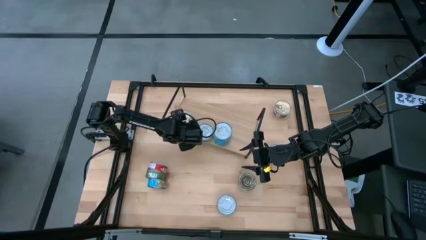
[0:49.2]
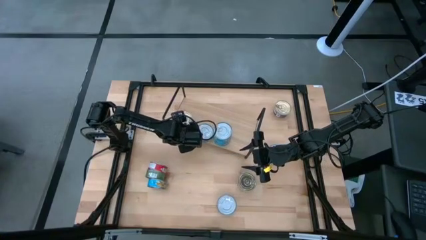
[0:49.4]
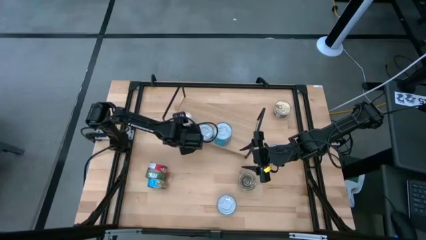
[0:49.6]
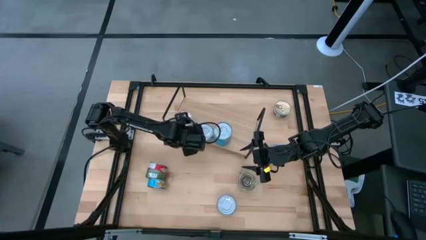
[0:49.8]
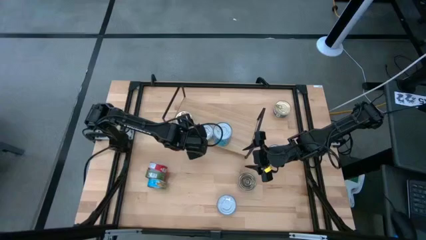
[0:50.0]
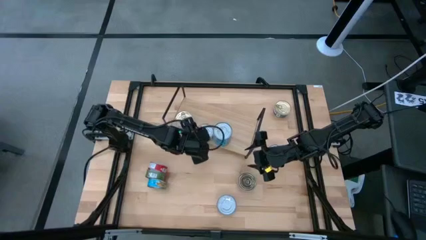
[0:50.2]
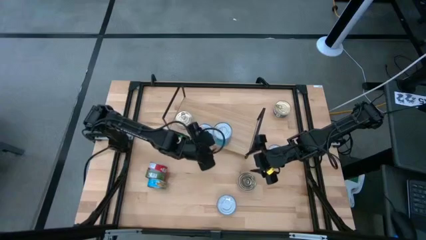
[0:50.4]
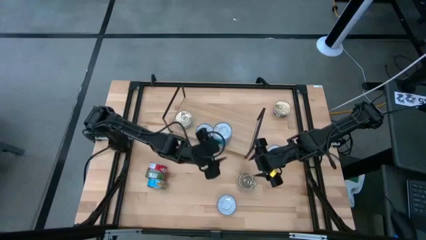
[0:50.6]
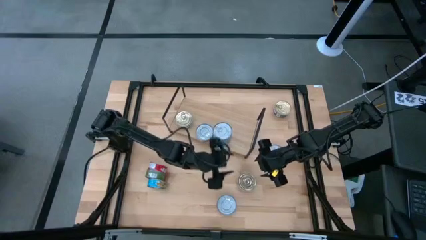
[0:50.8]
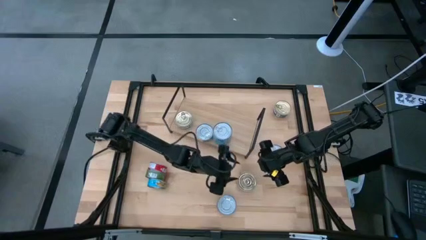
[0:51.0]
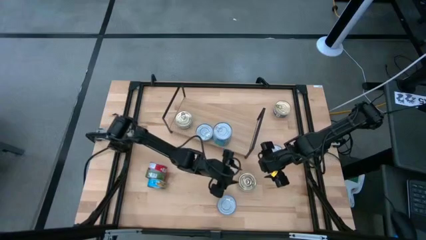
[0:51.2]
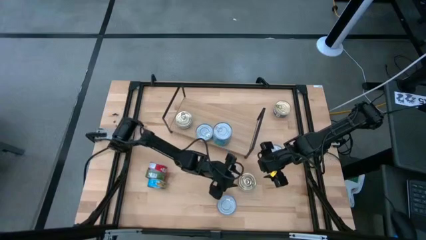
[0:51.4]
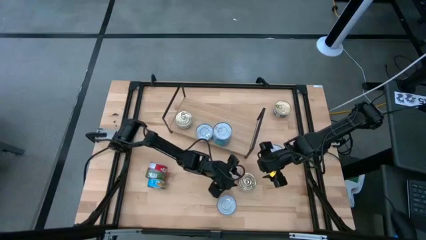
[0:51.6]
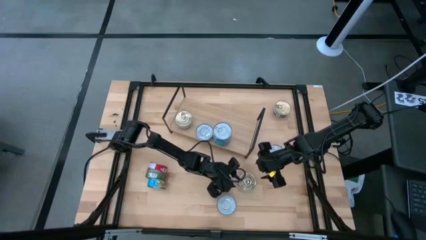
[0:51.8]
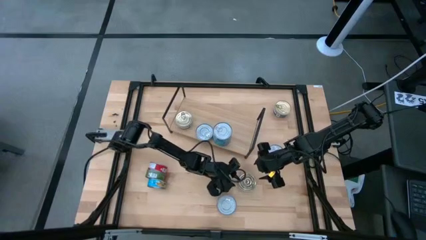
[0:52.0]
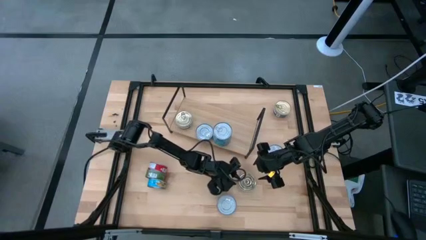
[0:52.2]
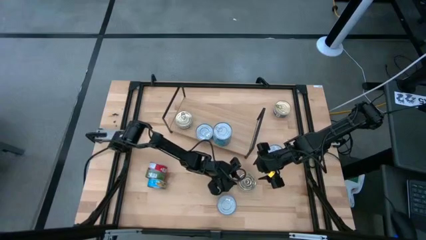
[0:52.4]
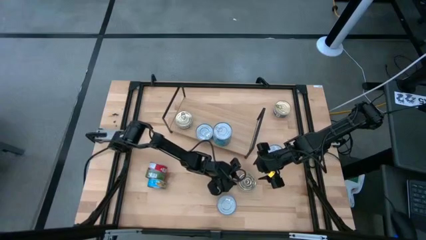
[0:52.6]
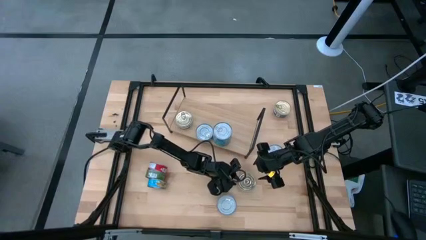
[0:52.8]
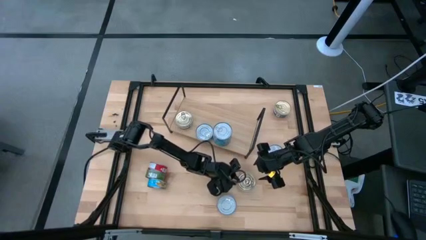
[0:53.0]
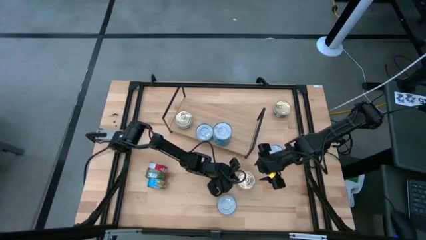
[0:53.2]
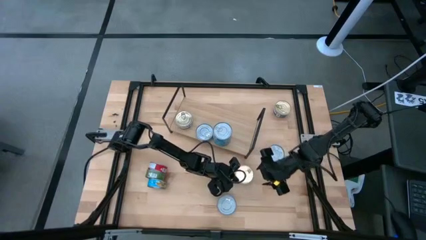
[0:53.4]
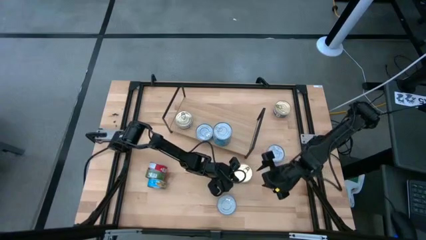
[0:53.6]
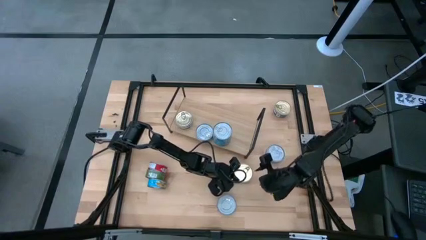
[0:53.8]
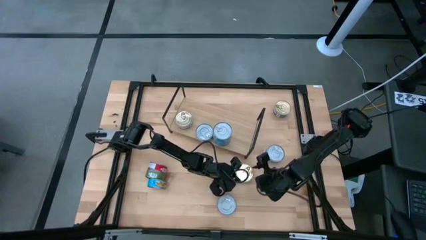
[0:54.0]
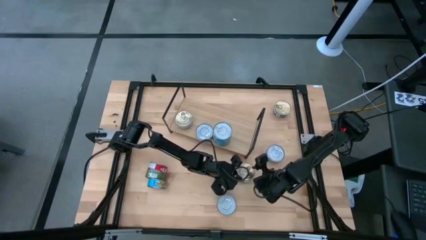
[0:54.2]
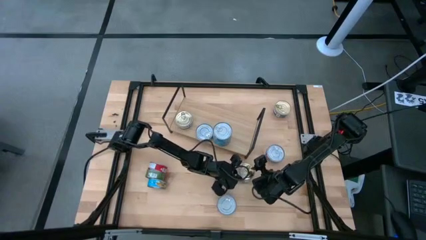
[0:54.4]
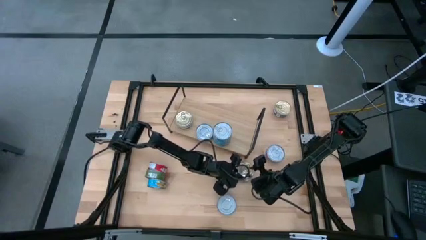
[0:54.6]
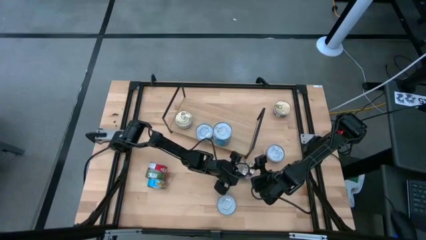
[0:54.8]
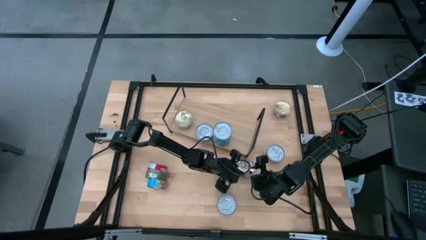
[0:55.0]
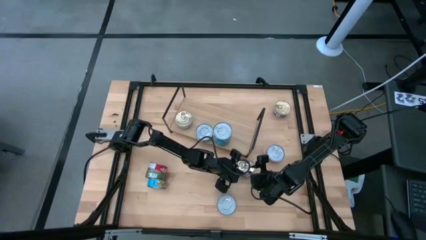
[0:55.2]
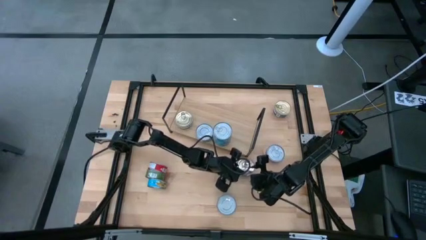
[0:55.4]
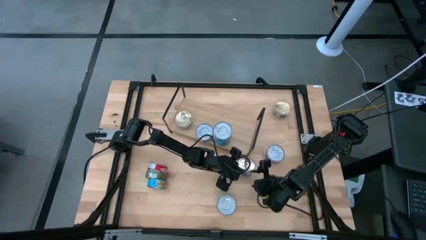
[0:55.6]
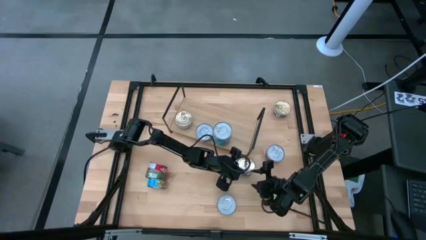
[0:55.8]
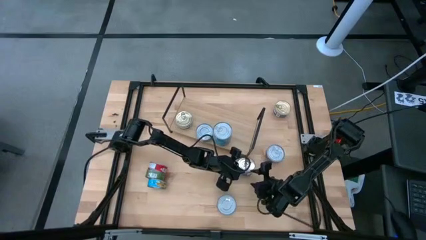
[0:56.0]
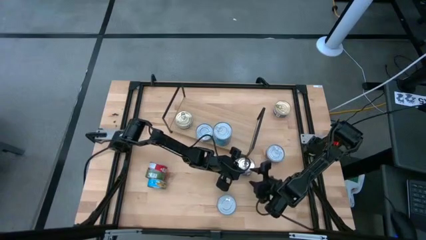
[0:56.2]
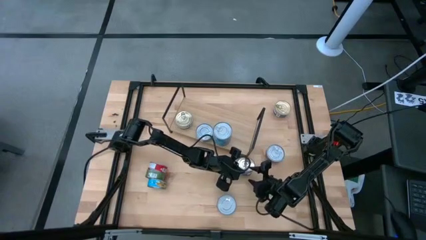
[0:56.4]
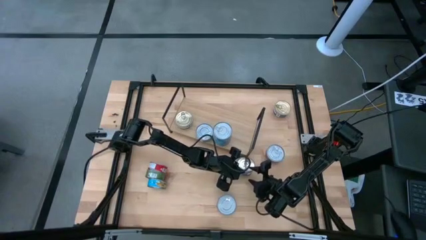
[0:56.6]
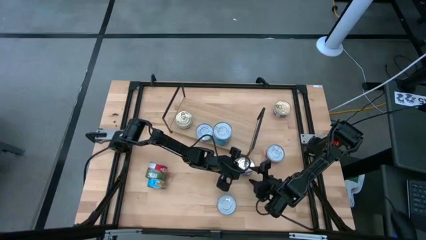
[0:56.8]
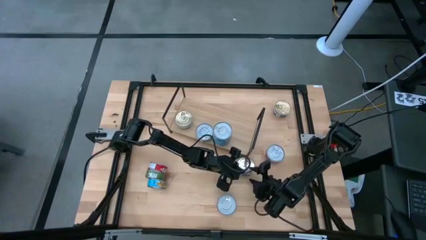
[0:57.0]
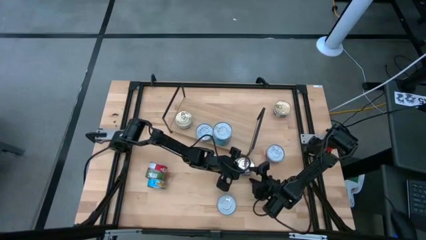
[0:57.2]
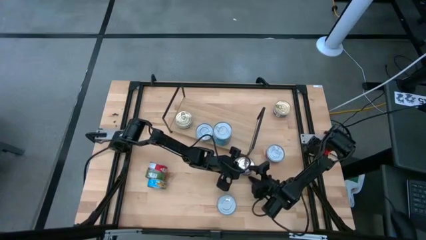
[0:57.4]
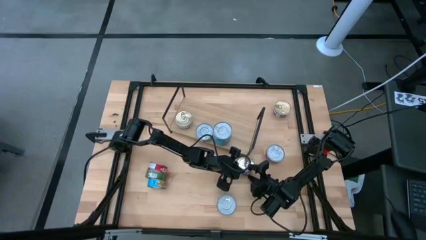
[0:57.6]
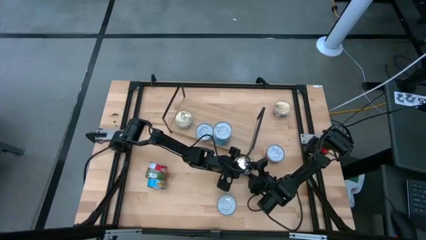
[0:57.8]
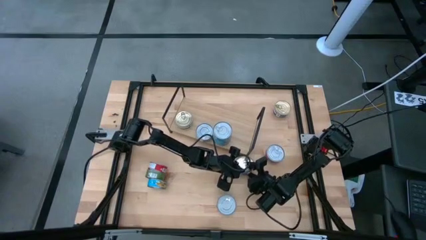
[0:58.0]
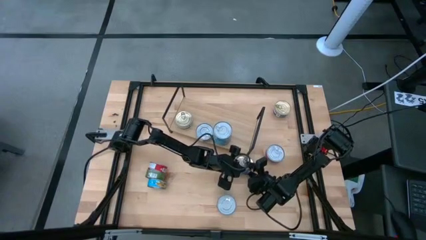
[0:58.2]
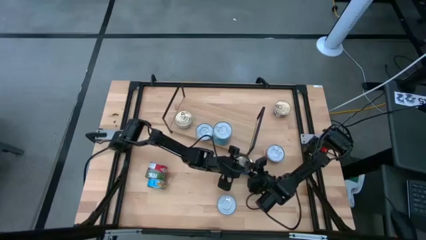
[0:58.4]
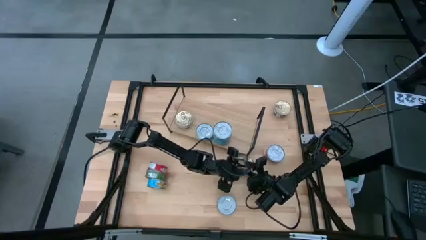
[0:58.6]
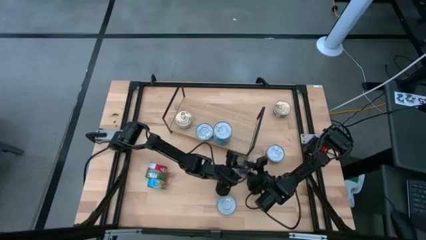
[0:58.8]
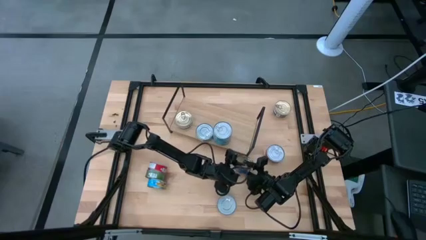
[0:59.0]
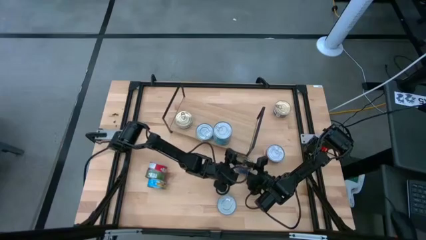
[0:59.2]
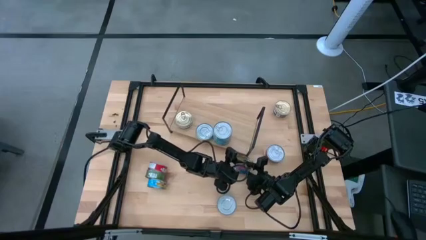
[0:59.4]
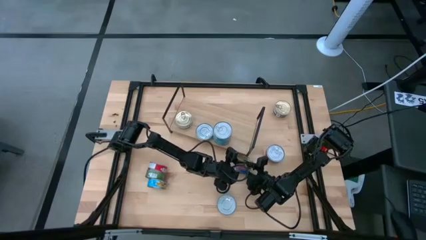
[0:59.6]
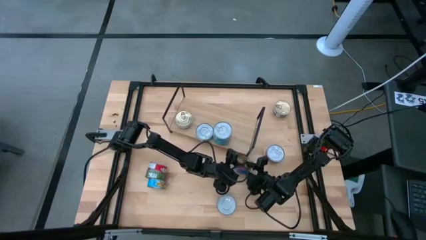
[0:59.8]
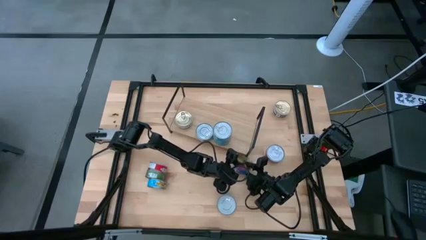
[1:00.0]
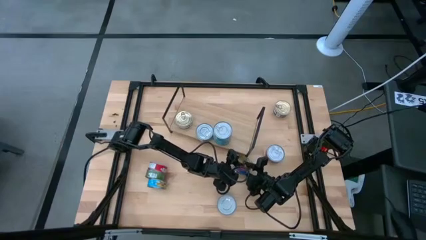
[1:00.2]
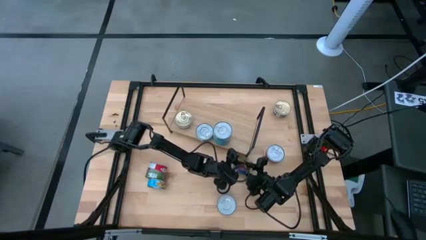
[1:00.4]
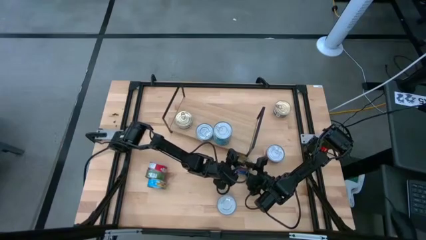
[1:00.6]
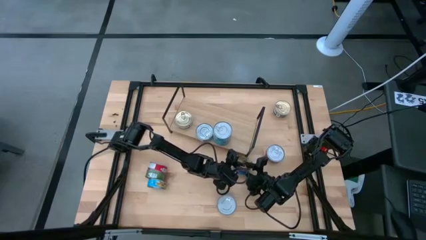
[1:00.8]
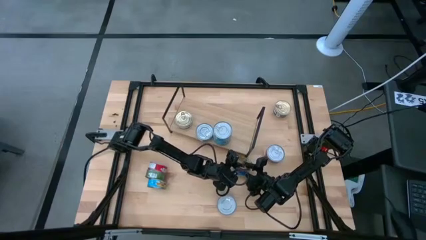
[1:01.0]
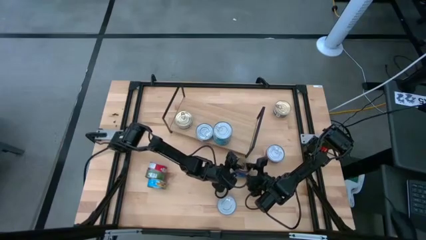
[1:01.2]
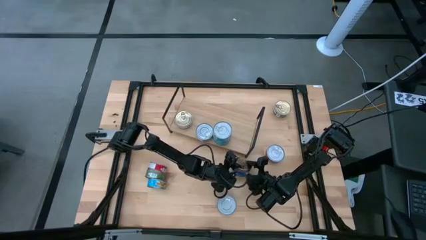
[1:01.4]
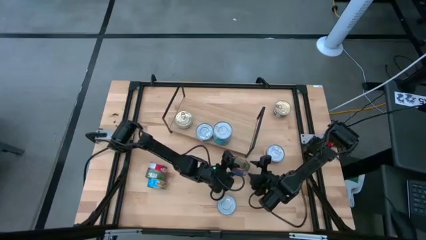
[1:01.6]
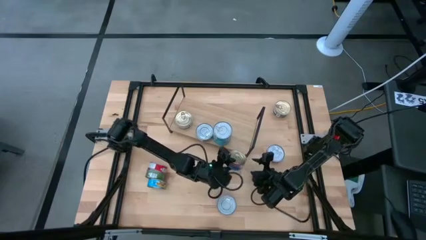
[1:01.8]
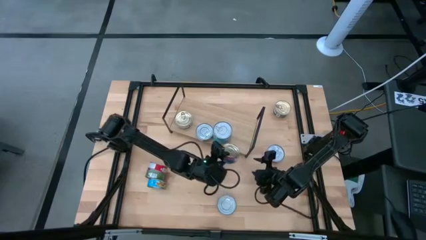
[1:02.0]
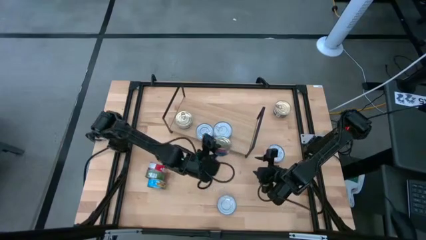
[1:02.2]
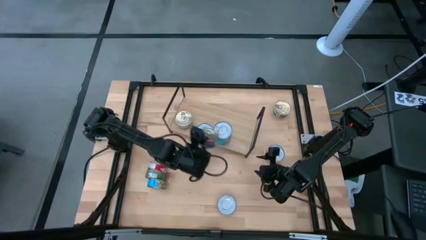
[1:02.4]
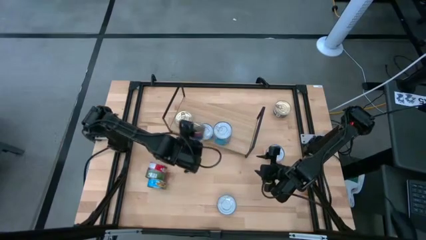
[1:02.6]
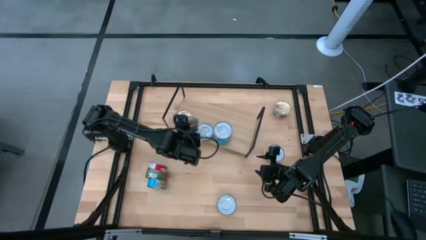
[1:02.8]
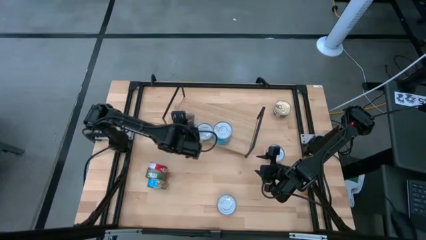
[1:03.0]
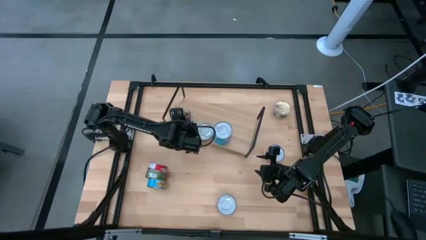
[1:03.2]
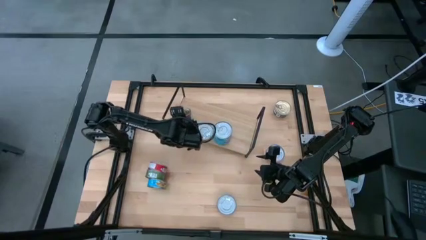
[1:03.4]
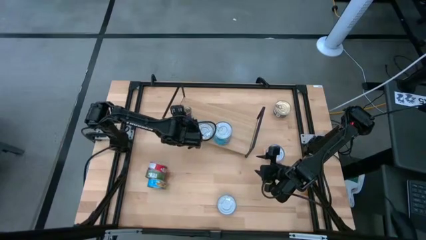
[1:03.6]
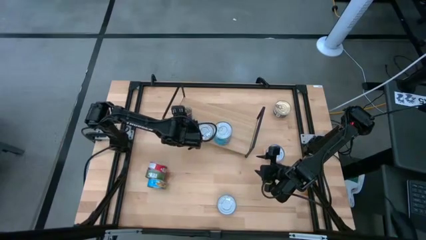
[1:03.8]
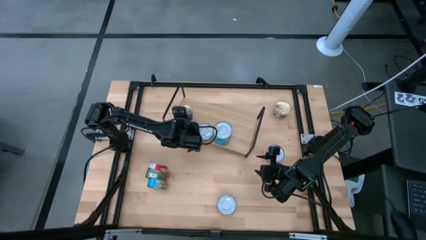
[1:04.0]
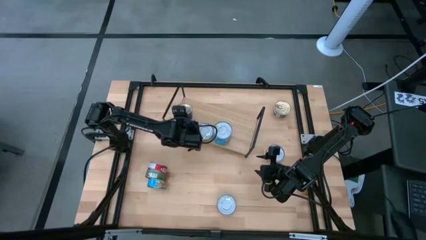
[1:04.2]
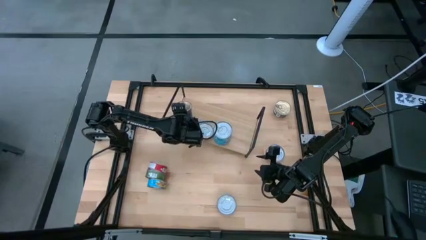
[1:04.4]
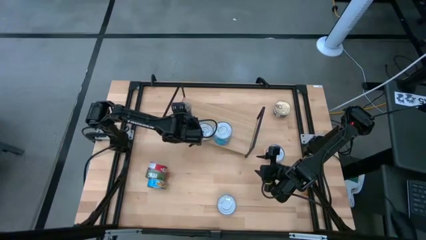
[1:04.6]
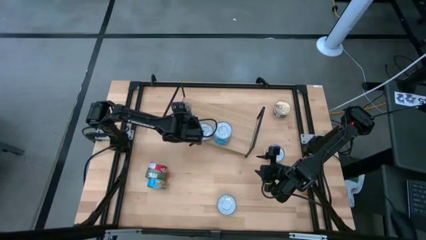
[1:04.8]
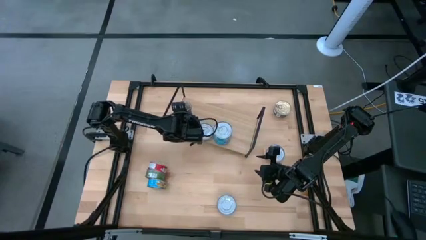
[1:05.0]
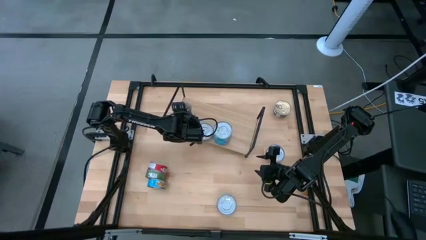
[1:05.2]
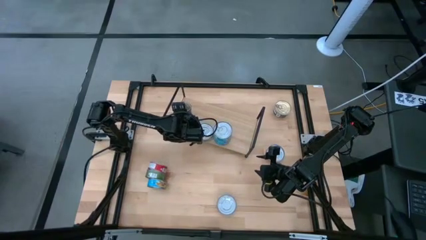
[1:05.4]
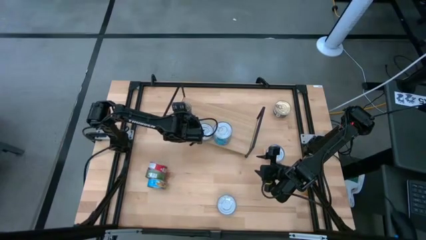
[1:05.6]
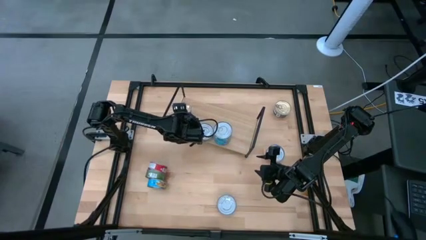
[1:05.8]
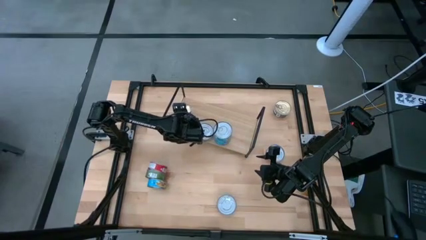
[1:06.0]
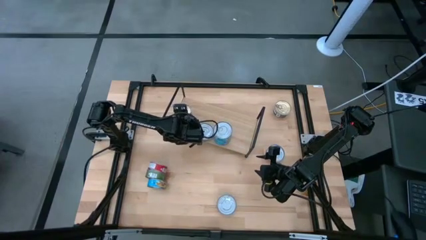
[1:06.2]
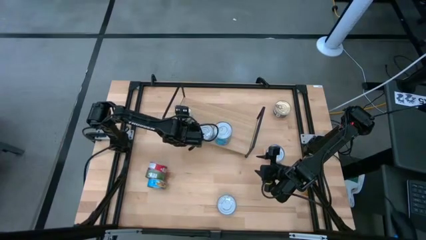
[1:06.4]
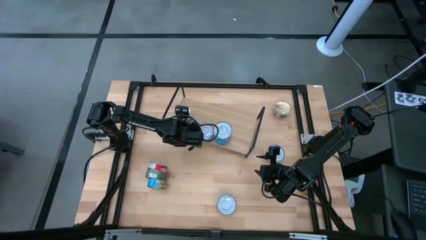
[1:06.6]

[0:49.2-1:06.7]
Task: Stack canned seafood by type on shelf
Stack the blue-pink tuna can on top of the blue-pink tuna can on the shelf
